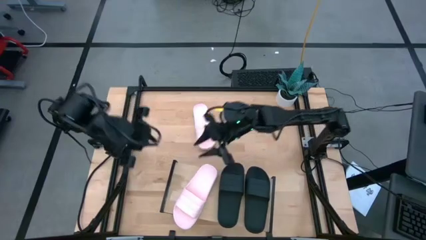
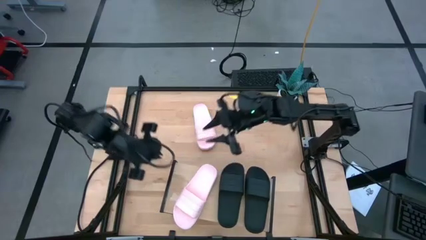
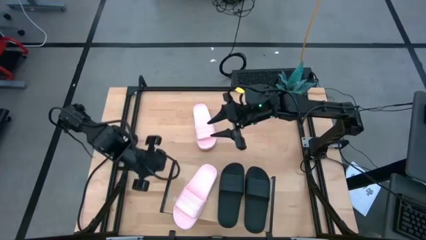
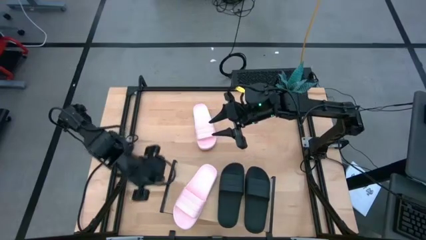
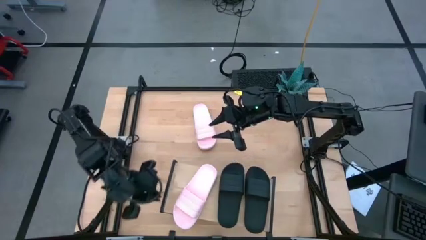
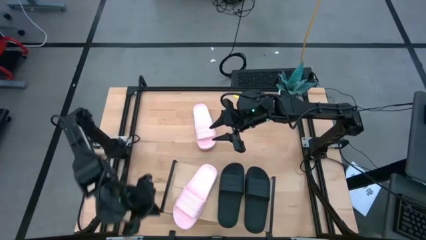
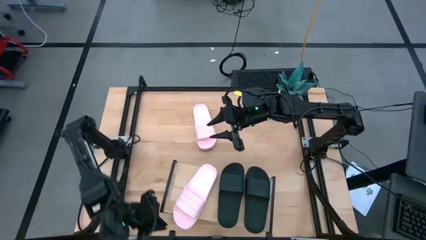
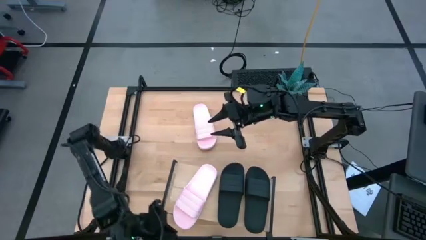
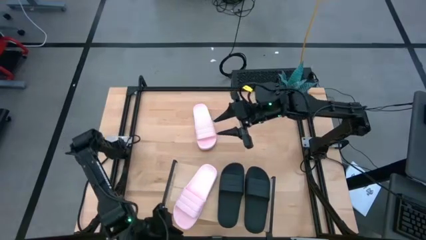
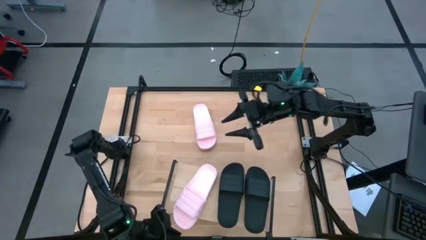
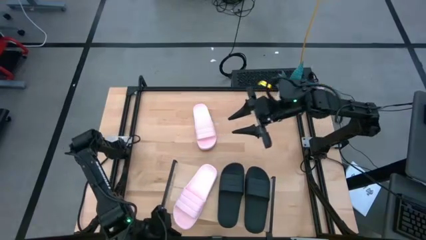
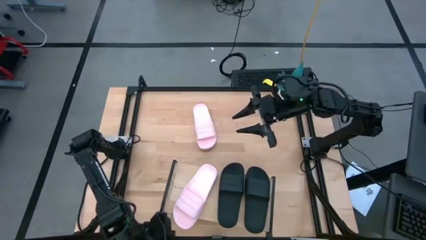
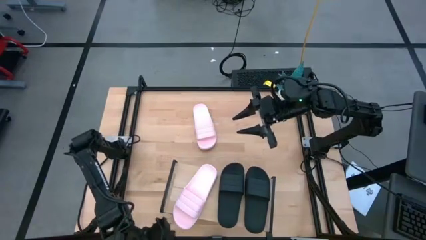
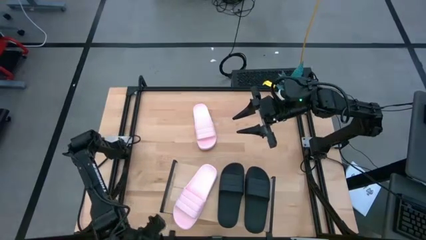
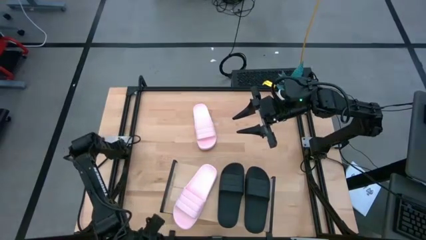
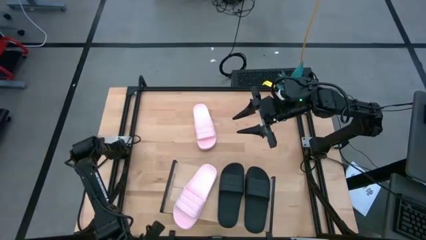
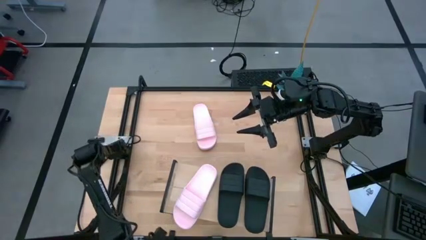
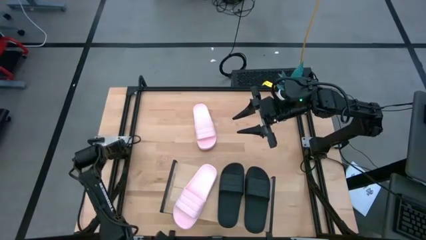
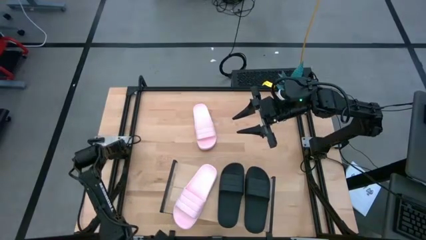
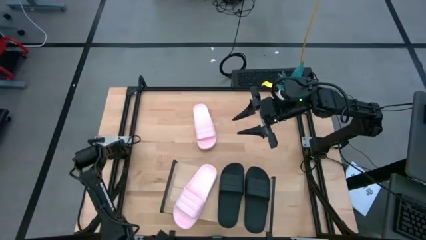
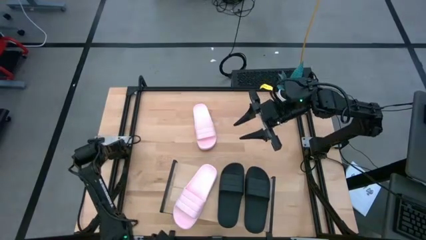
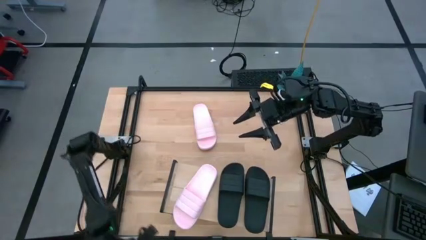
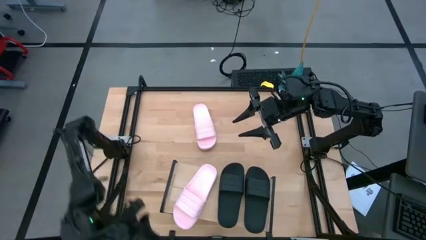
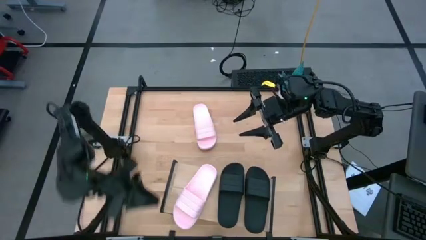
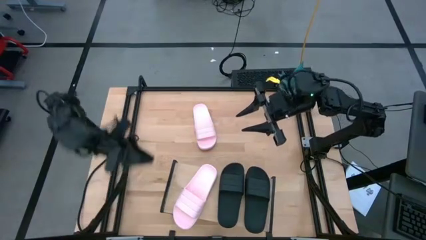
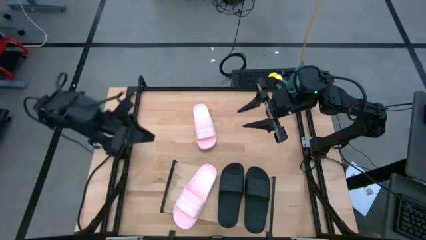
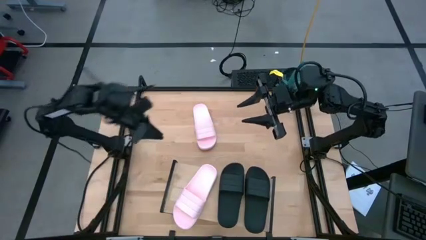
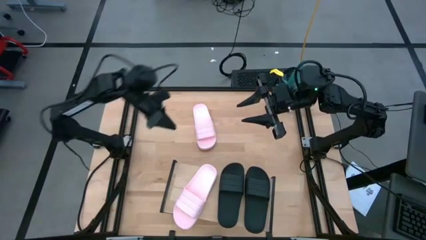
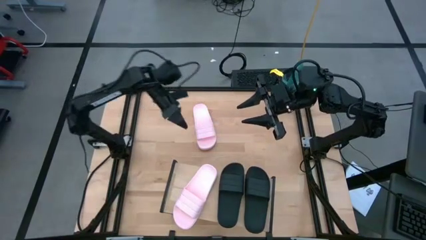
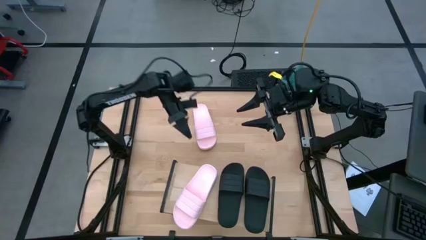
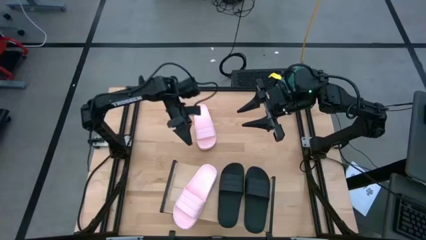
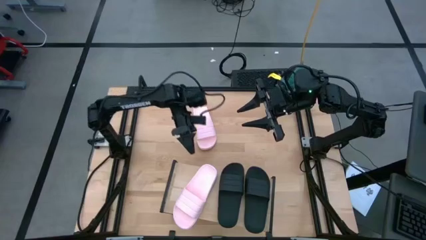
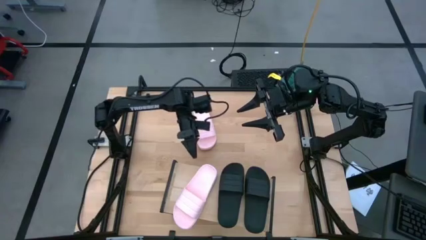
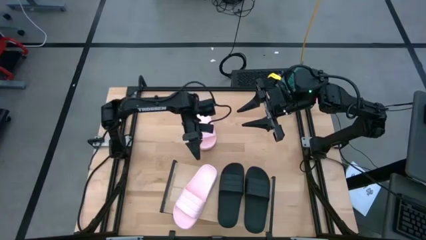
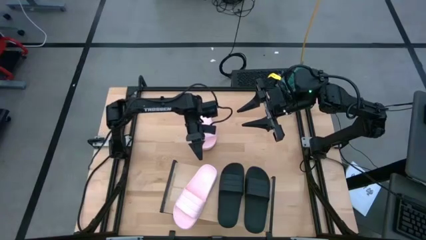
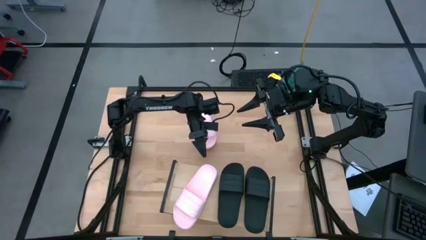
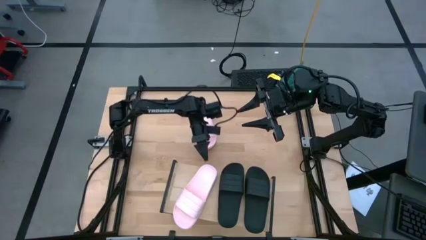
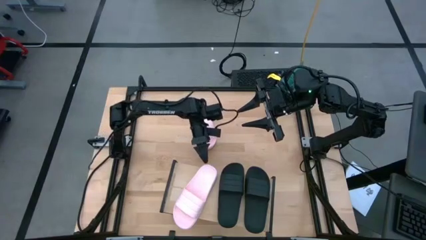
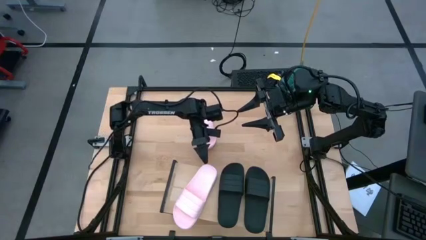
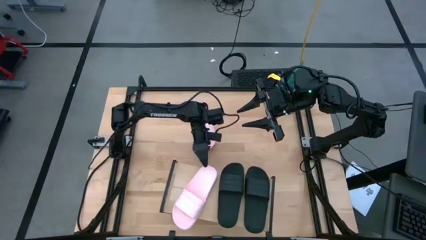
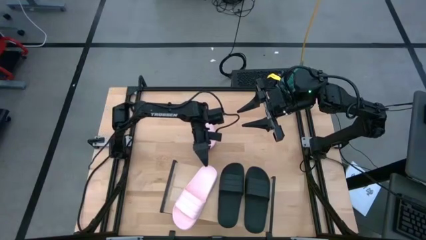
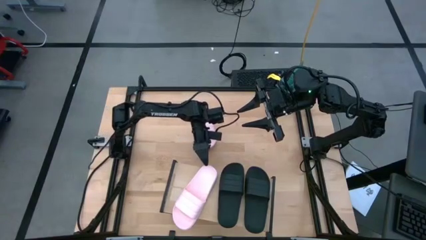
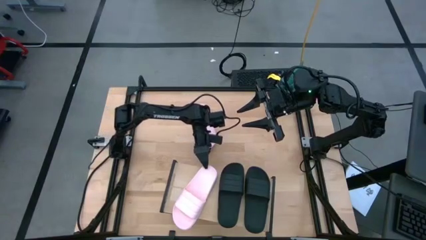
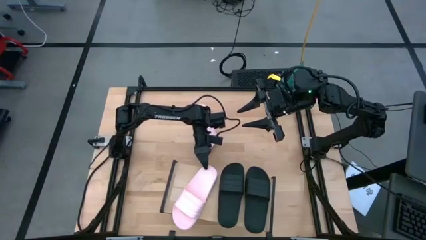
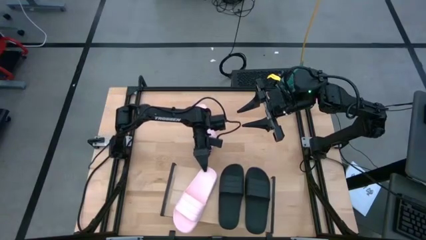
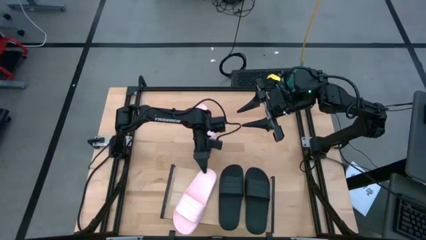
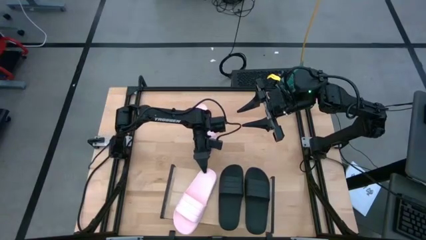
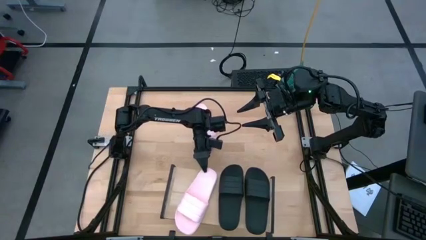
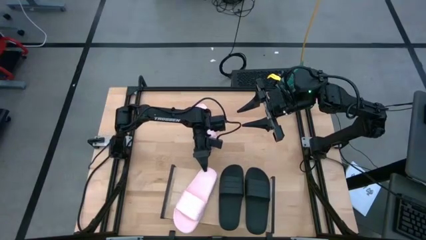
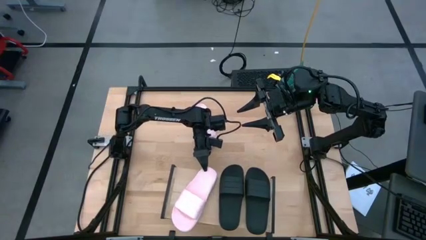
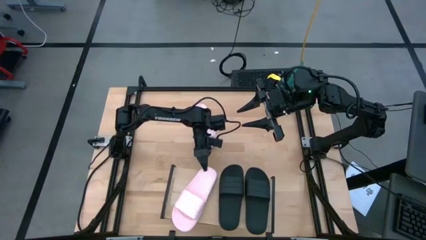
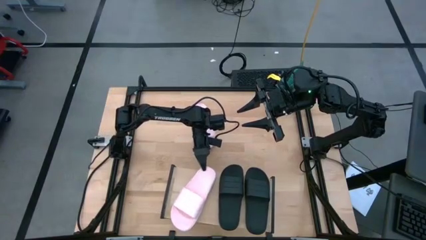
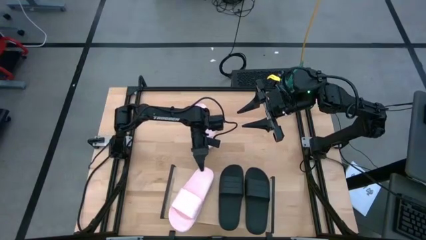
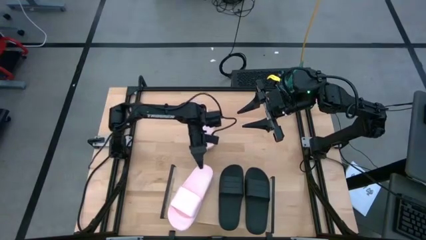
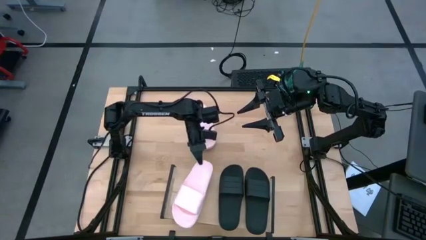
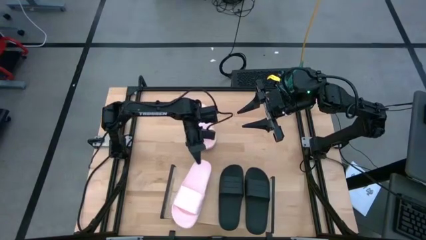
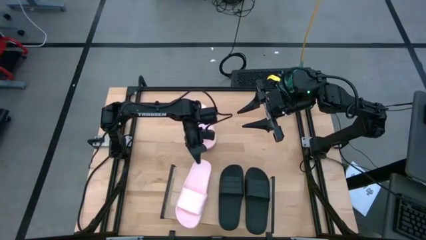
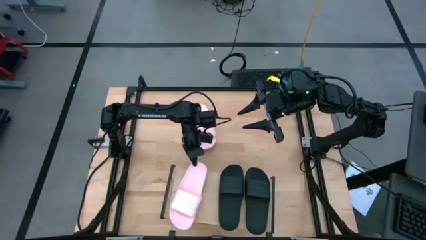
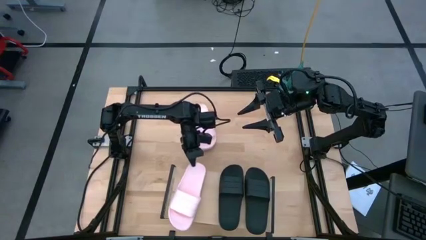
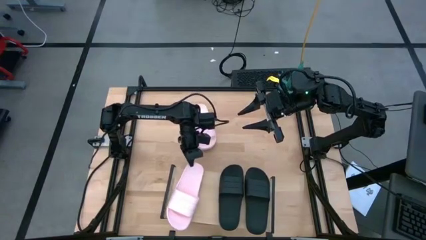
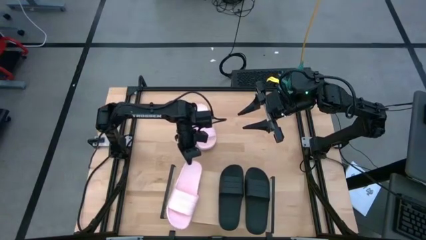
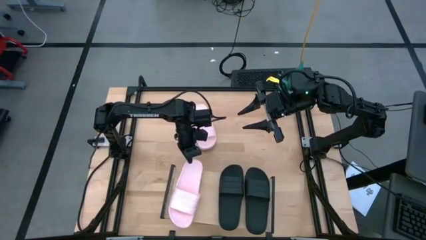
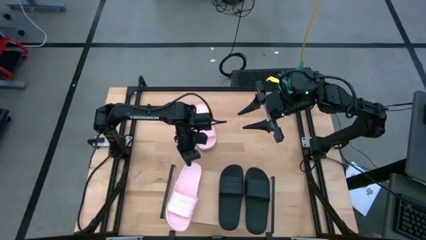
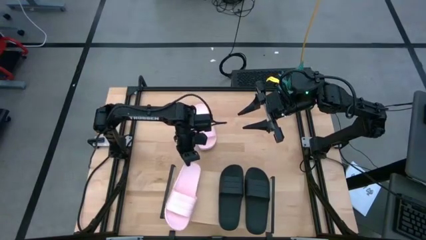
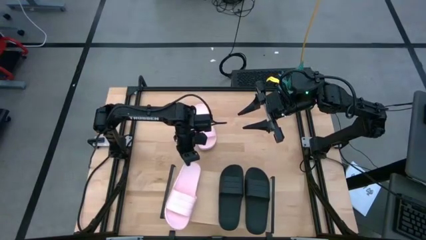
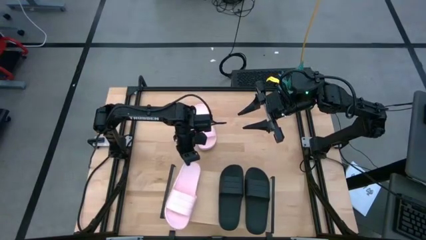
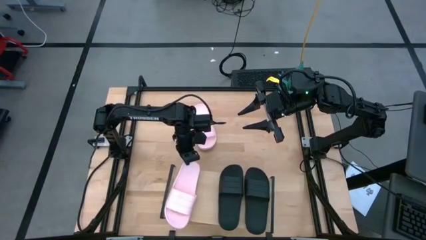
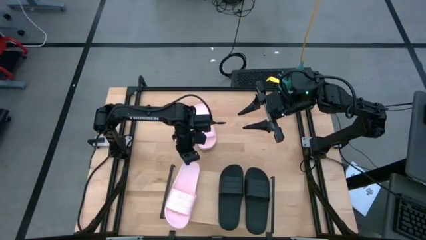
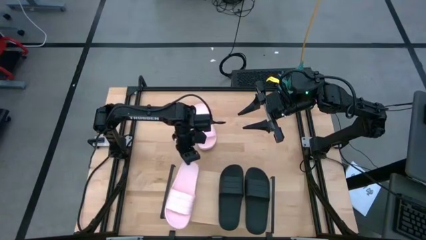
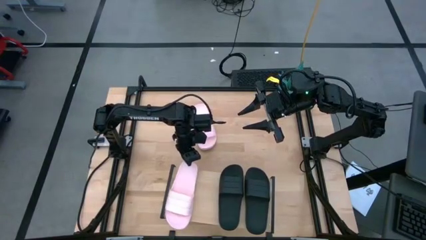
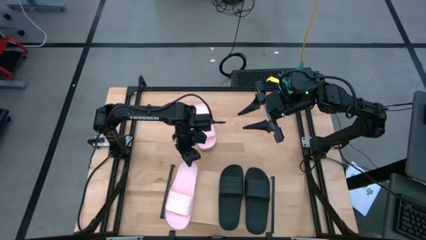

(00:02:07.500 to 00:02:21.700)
Task: Pick and place slides into the shelf
Put the left pink slipper on the shelf
